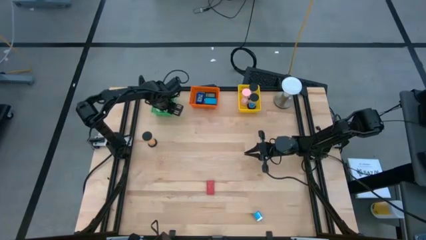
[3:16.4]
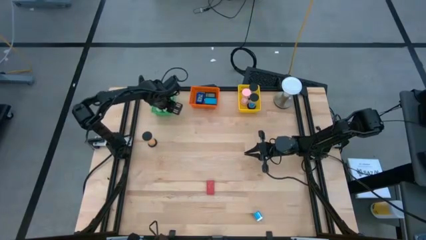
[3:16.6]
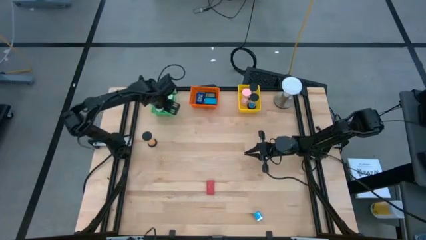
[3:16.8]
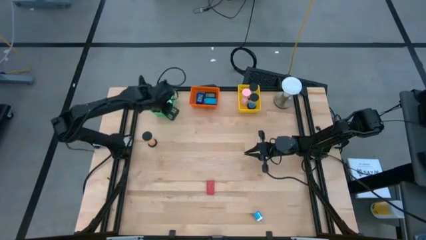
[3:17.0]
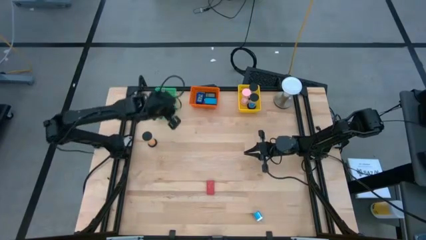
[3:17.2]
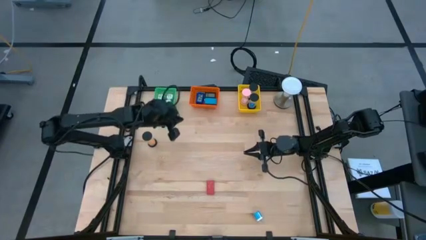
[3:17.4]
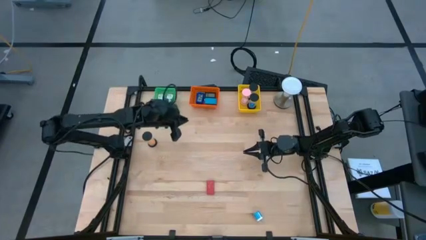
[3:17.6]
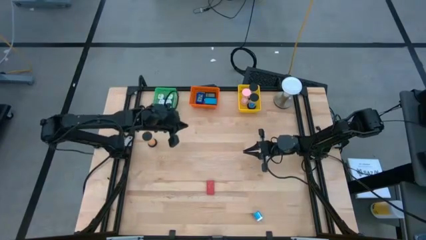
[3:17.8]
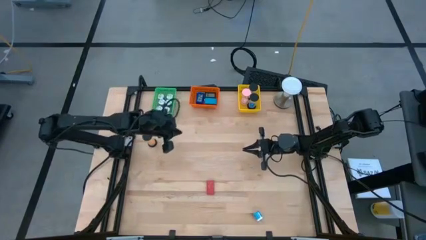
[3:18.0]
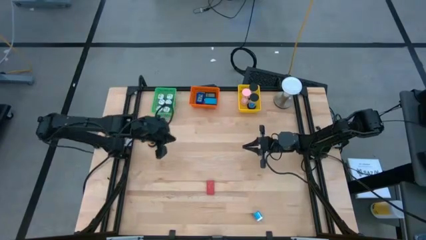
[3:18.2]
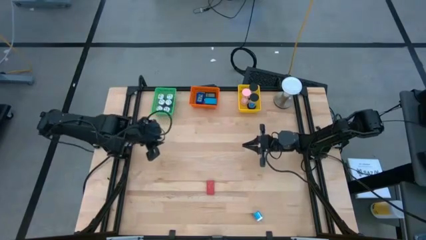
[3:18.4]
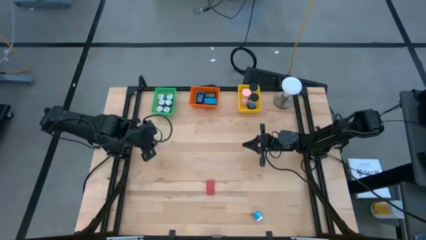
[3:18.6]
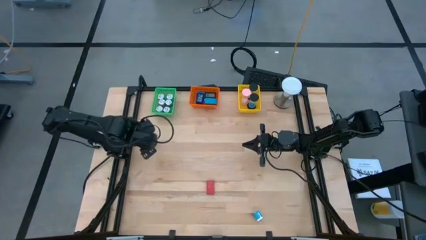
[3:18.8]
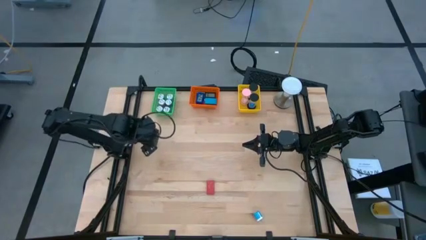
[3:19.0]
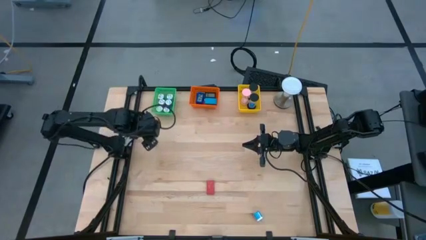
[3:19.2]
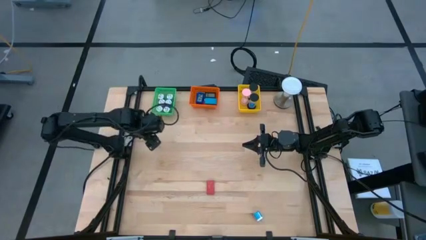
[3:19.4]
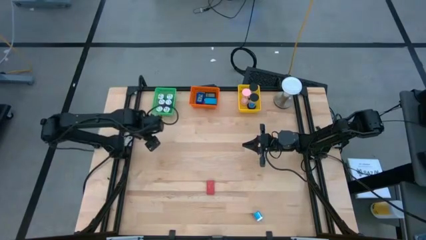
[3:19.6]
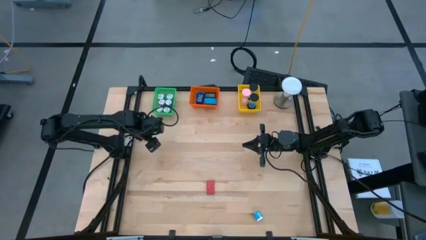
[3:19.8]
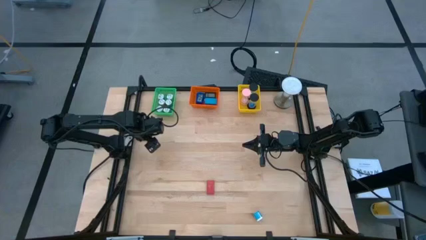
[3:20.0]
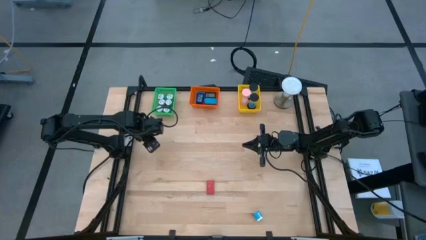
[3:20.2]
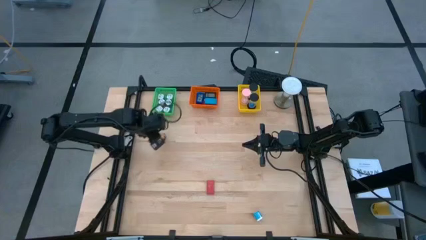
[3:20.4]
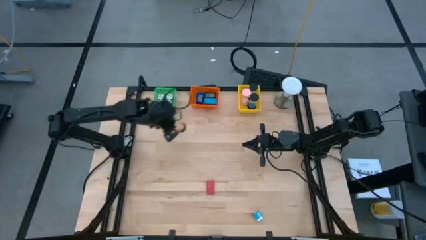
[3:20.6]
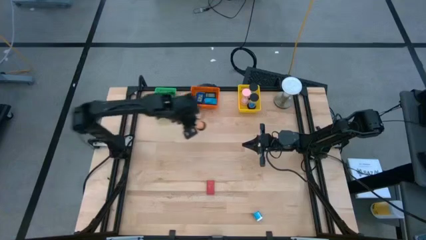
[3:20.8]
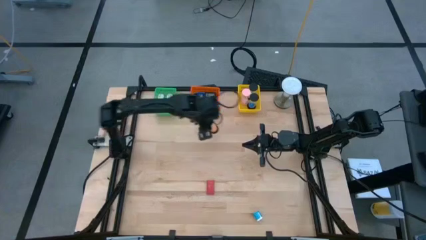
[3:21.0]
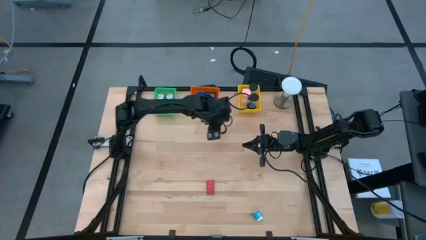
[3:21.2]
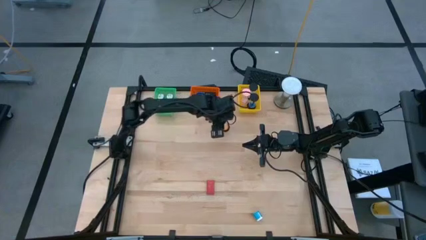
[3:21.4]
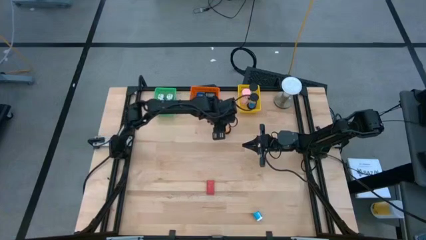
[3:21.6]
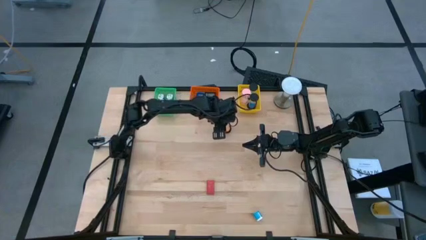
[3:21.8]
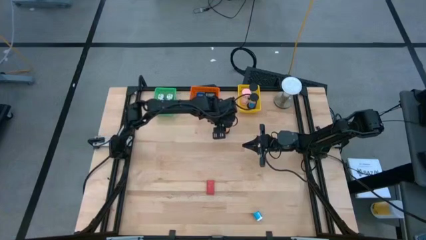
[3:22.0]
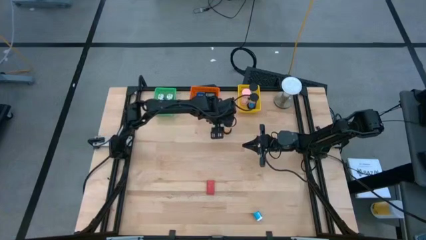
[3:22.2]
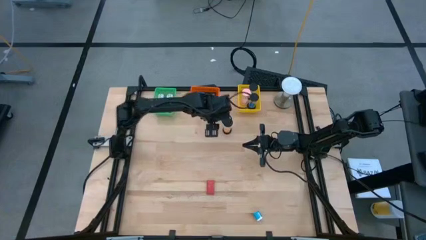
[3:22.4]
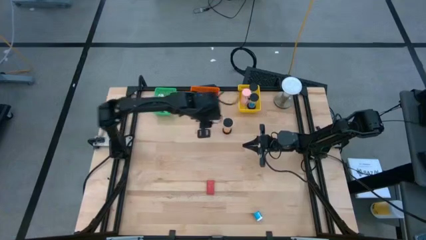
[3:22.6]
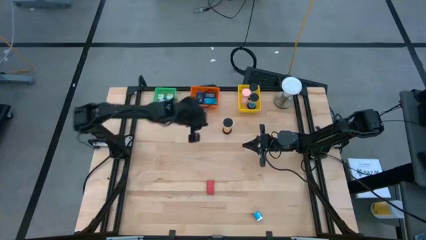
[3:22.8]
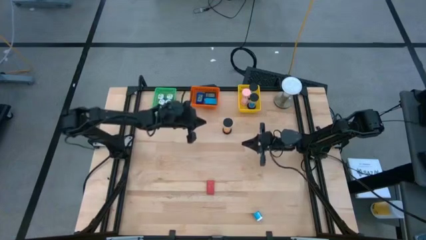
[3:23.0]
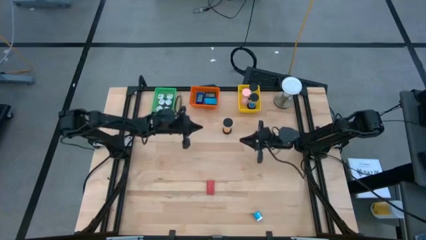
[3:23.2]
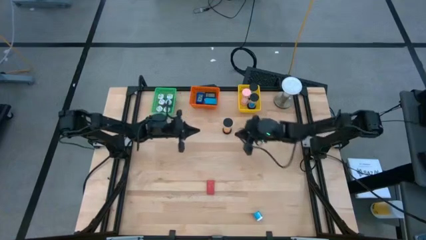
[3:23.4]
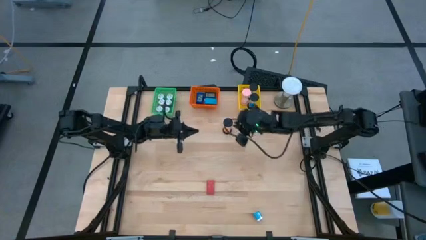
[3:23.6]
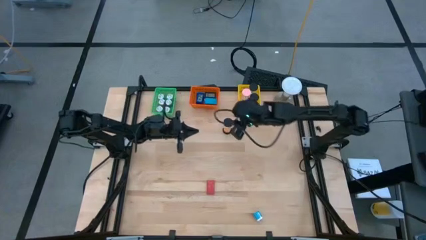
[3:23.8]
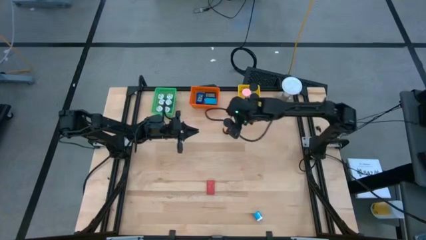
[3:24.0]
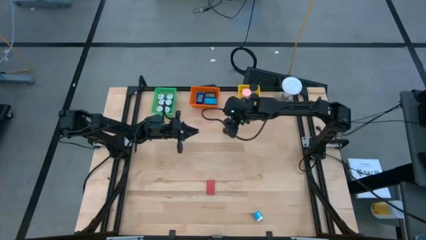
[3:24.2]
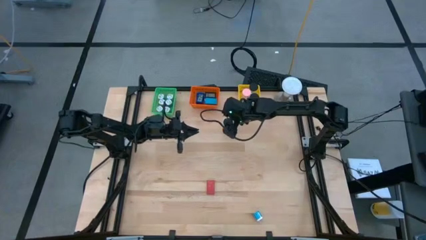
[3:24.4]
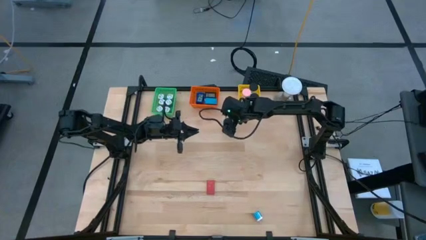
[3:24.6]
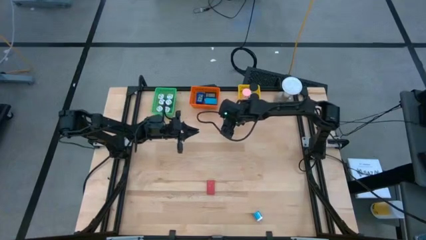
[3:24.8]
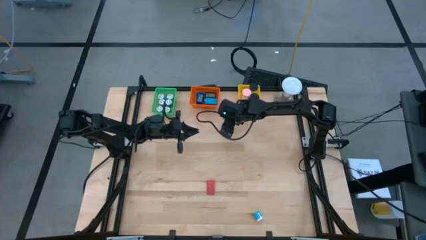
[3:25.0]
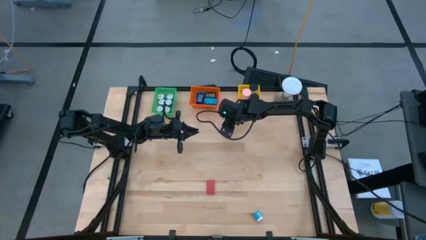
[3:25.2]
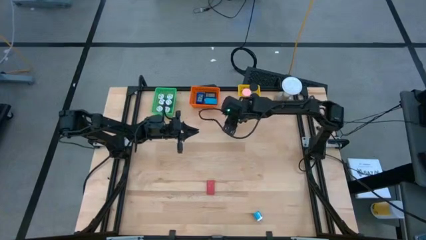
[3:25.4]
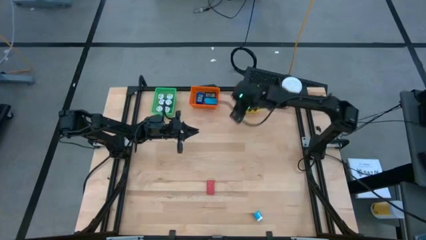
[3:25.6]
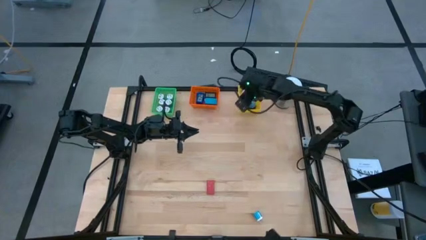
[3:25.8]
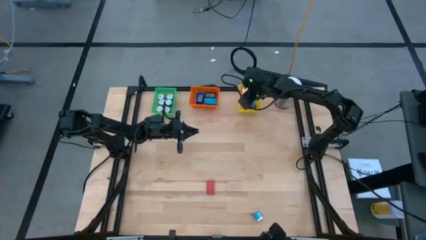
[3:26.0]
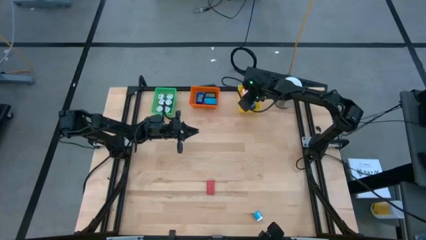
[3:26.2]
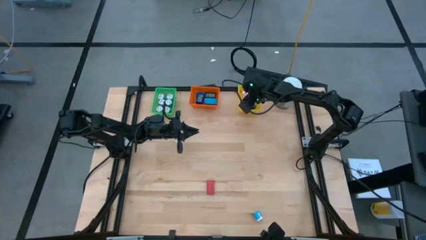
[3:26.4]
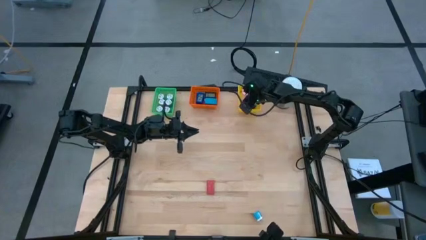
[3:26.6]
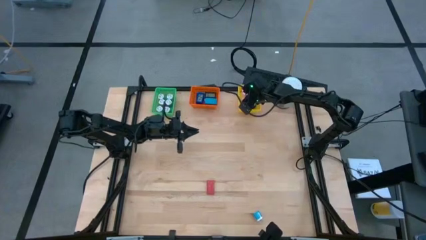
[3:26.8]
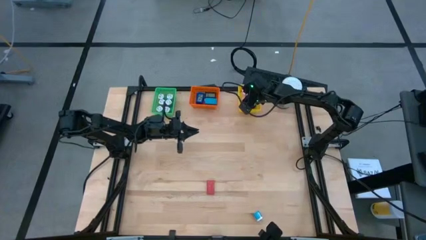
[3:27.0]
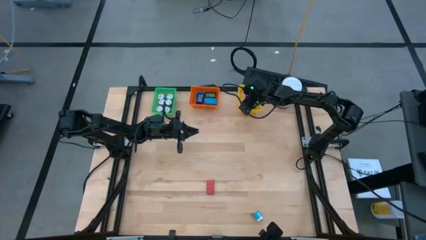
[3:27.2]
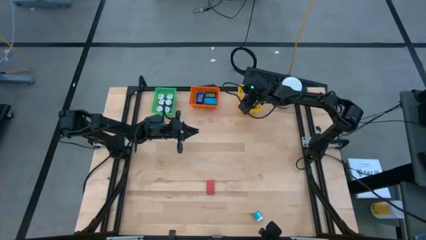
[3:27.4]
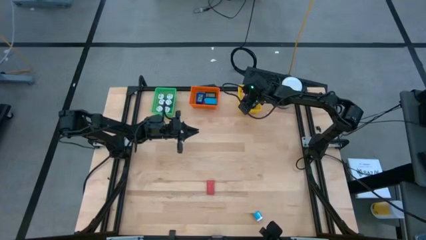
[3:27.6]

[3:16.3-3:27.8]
Task: Pick & Place Office items
Put the orange hourglass into the yellow bin

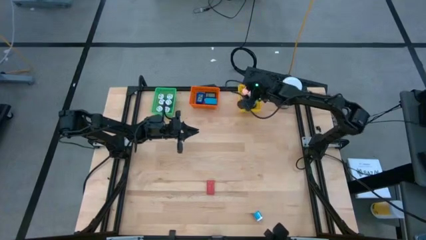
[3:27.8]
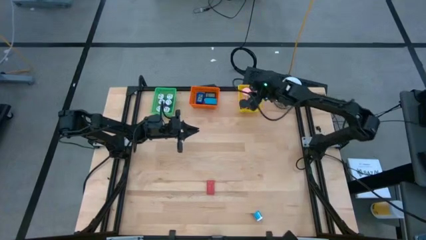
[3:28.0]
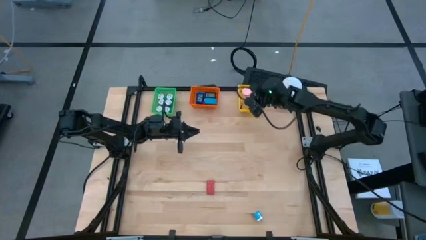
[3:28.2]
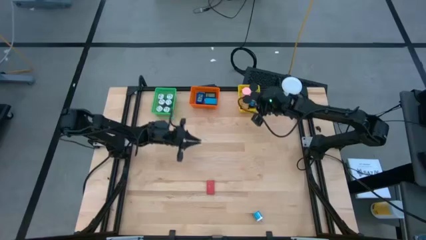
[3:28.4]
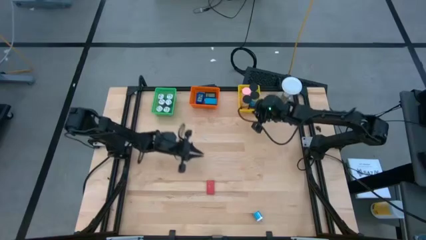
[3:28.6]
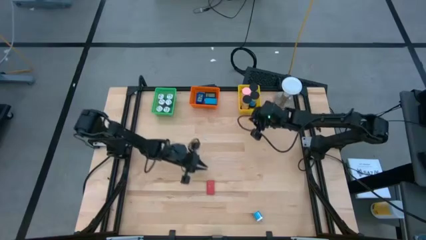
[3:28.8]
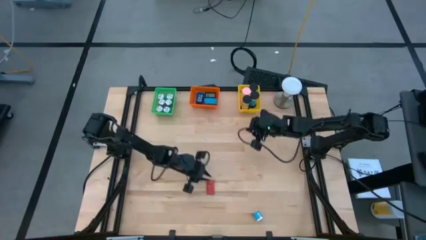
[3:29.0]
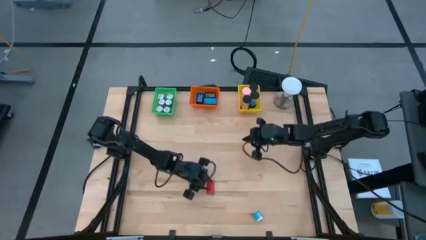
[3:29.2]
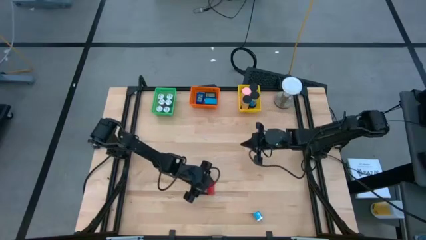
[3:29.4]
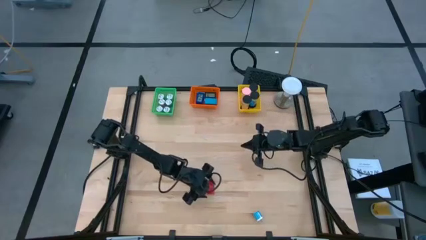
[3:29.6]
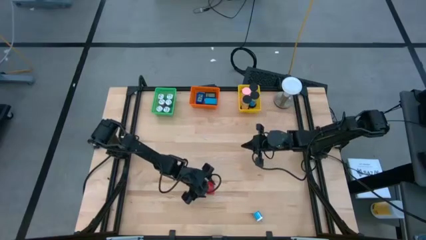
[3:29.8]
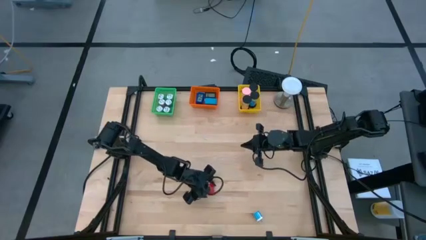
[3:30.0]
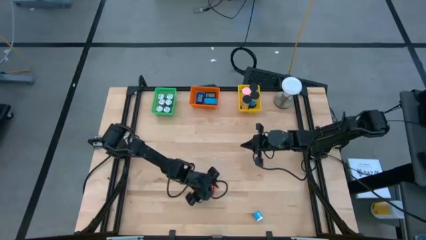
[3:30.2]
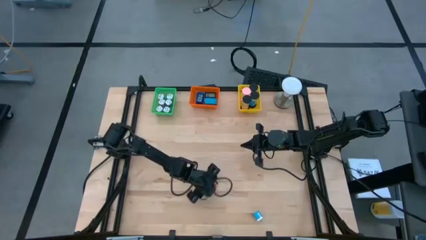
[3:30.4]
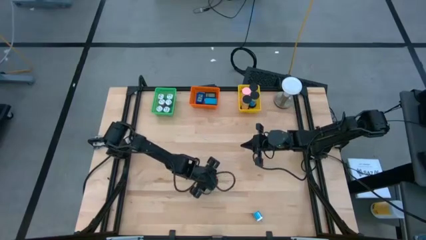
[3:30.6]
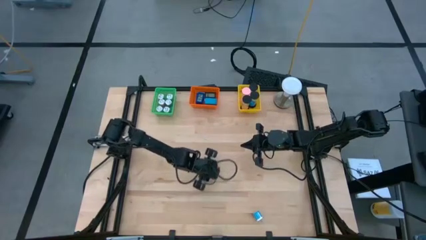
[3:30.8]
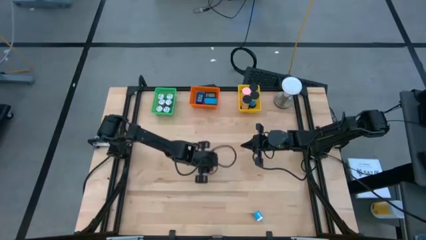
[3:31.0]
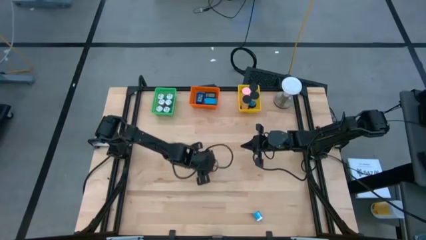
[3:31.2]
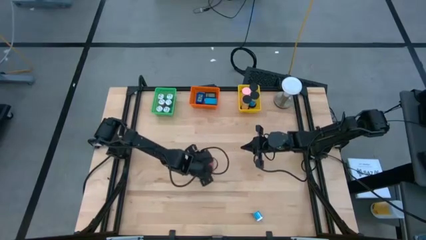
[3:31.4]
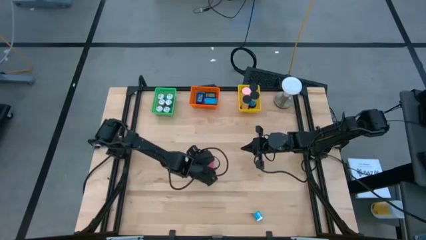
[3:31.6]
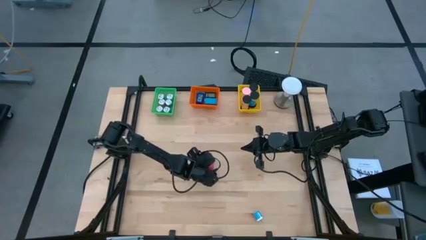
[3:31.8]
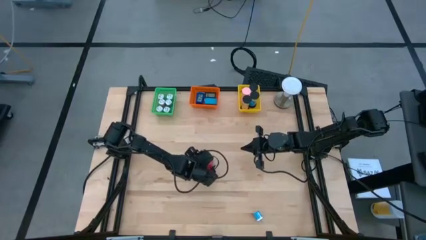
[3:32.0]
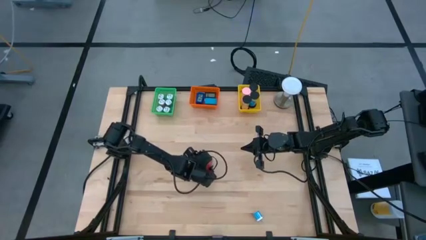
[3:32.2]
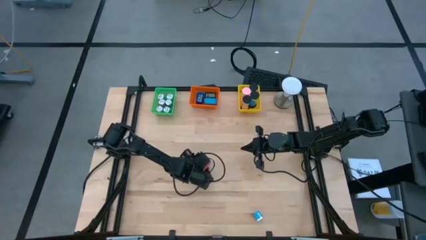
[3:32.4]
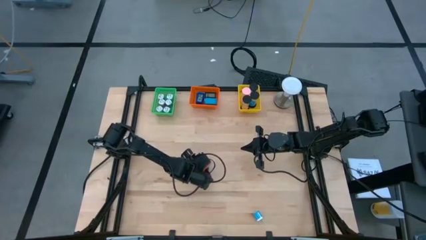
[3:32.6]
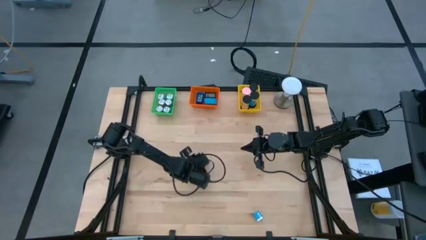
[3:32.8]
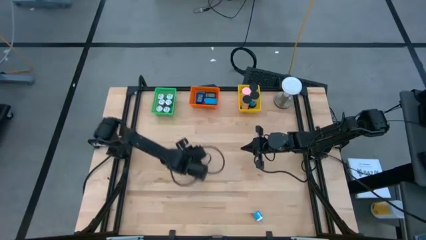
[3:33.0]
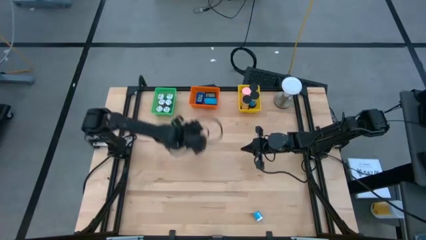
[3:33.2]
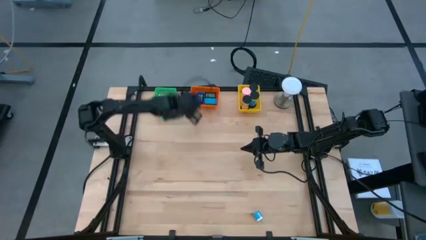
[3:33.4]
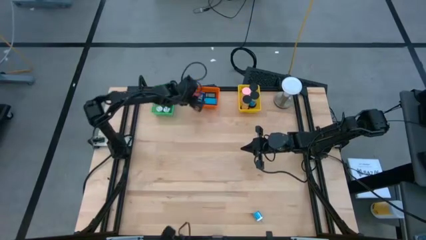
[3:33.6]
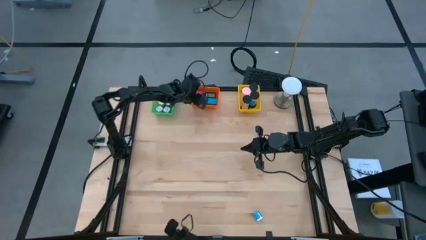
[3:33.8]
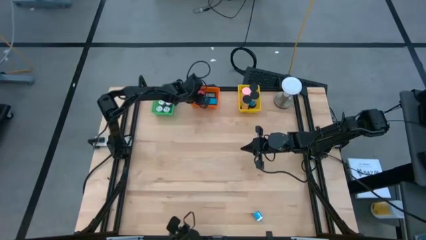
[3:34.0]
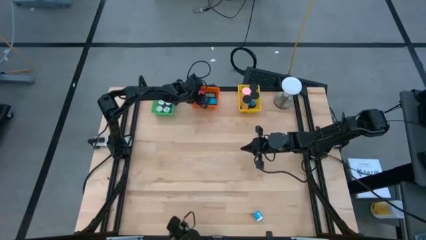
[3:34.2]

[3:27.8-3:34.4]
Put the red digital clock into the orange bin
